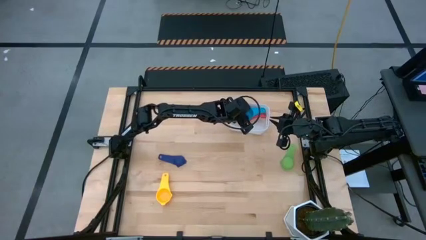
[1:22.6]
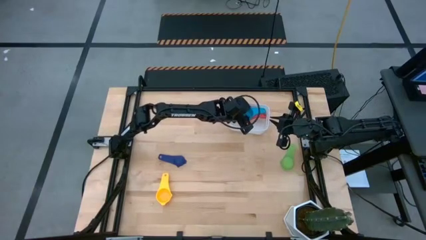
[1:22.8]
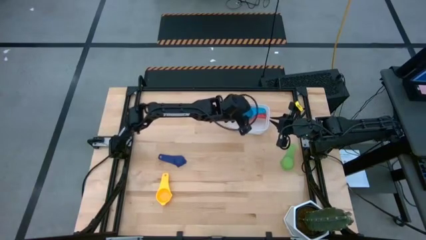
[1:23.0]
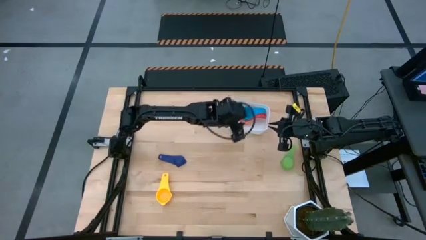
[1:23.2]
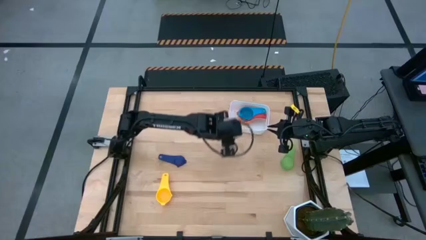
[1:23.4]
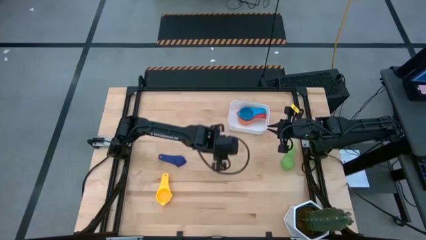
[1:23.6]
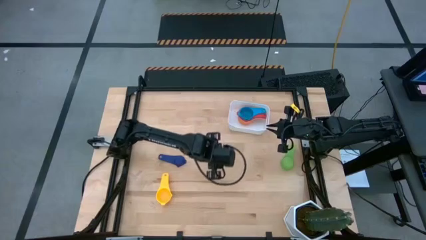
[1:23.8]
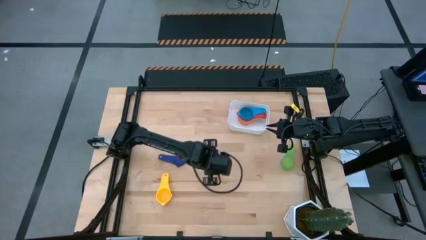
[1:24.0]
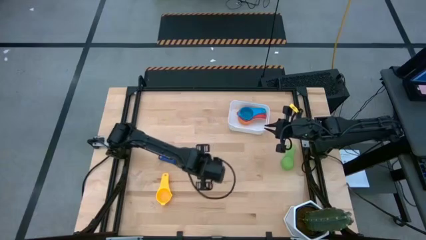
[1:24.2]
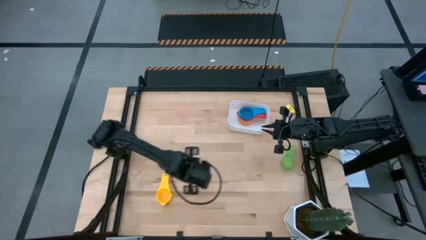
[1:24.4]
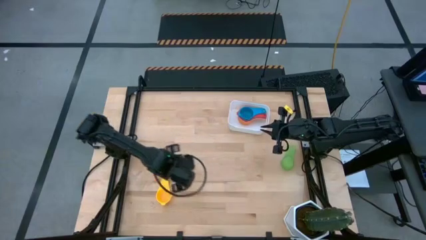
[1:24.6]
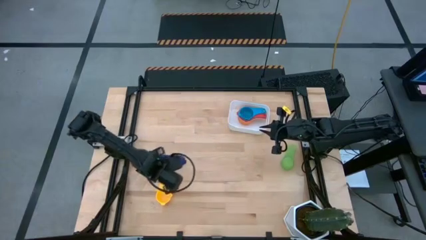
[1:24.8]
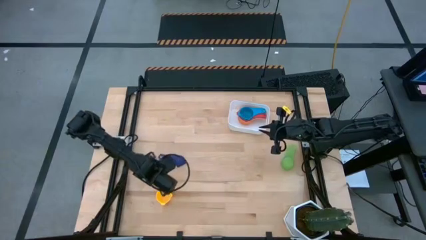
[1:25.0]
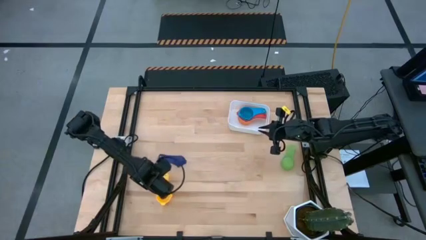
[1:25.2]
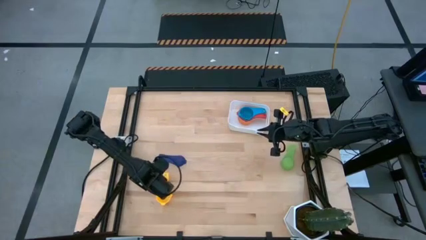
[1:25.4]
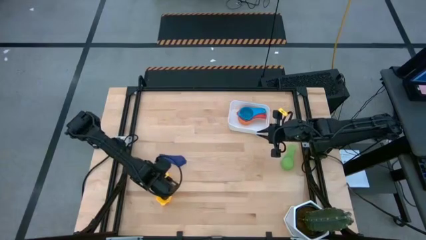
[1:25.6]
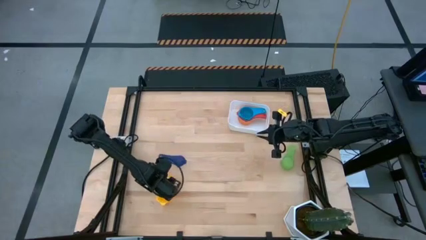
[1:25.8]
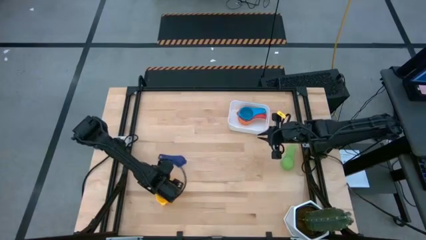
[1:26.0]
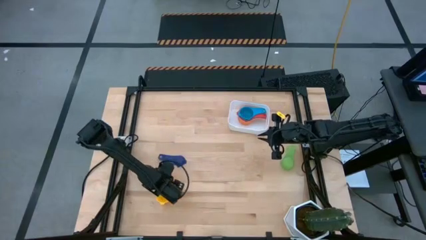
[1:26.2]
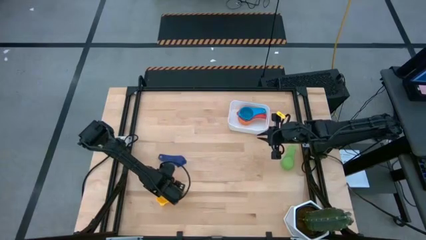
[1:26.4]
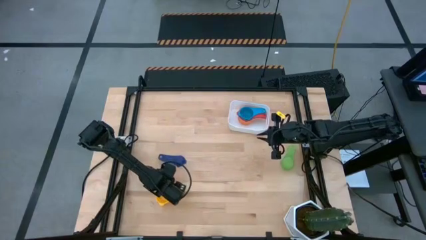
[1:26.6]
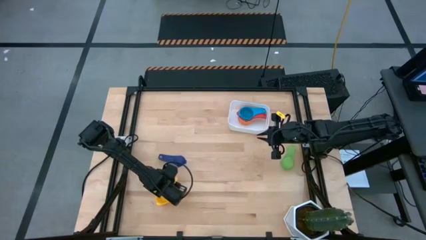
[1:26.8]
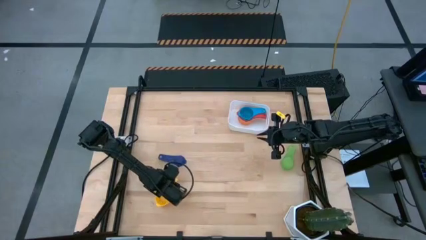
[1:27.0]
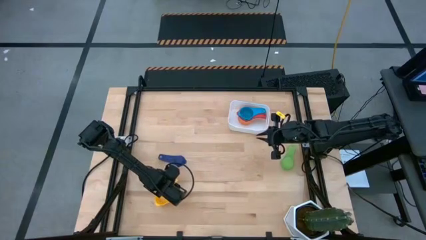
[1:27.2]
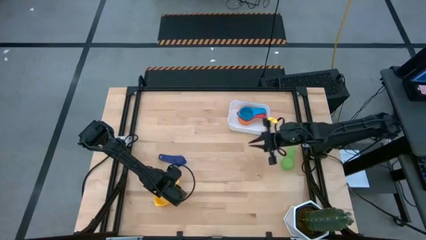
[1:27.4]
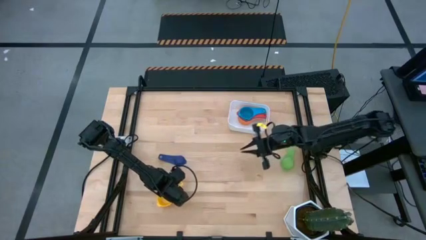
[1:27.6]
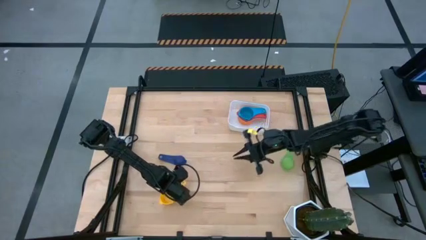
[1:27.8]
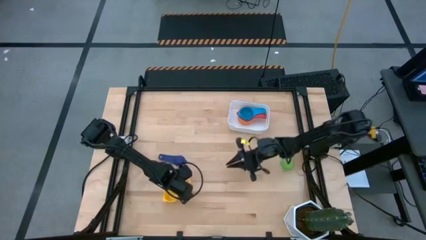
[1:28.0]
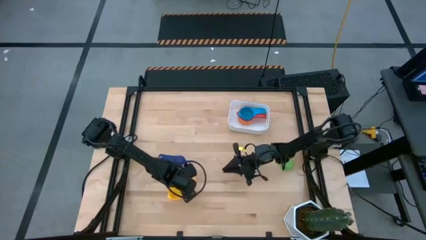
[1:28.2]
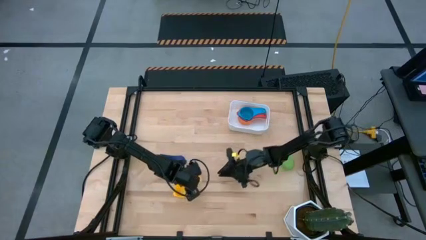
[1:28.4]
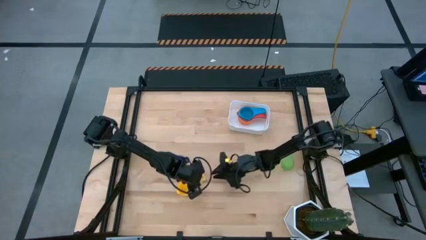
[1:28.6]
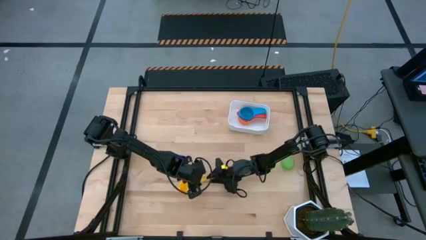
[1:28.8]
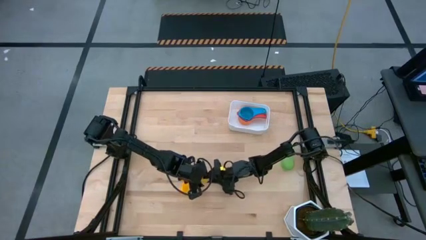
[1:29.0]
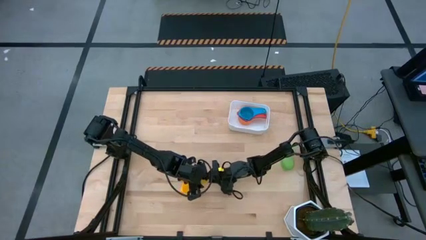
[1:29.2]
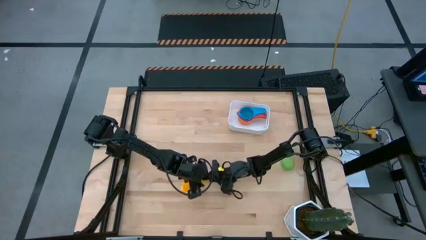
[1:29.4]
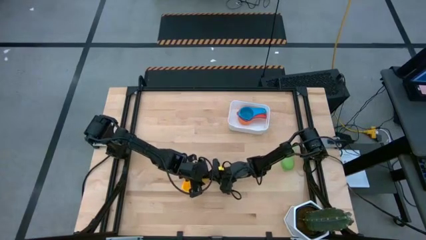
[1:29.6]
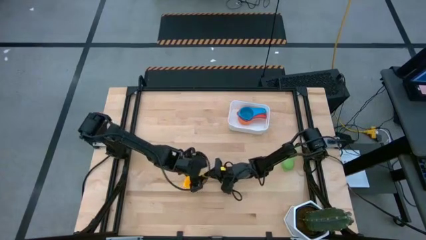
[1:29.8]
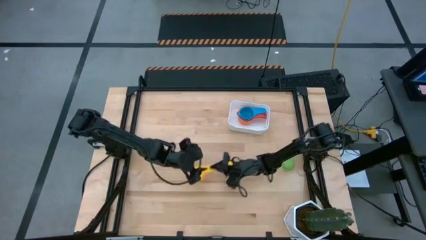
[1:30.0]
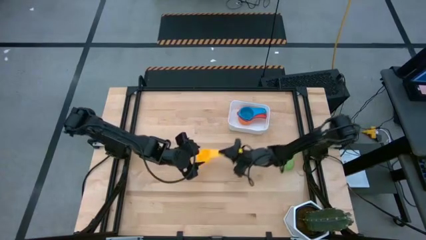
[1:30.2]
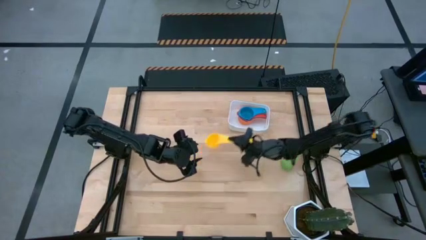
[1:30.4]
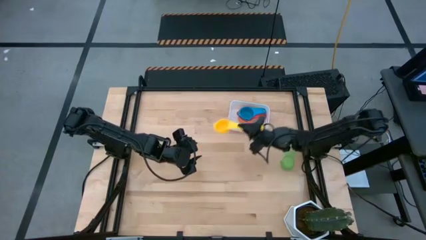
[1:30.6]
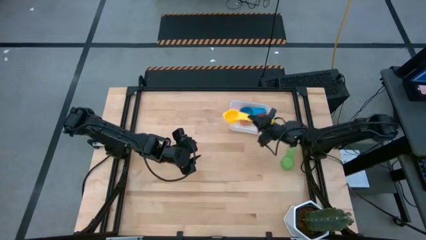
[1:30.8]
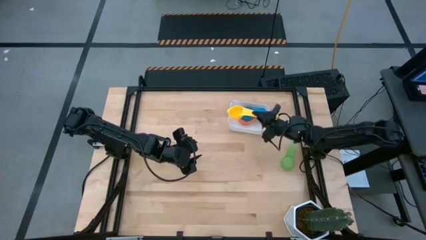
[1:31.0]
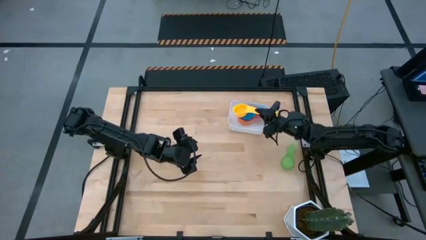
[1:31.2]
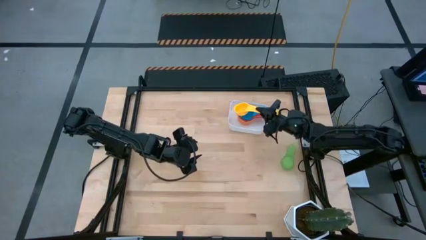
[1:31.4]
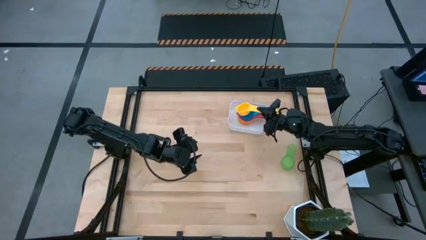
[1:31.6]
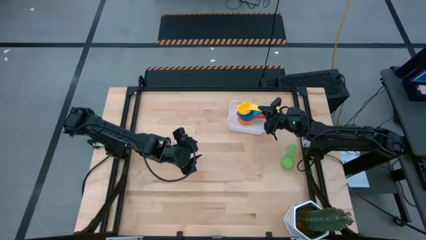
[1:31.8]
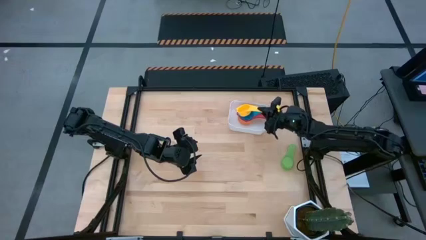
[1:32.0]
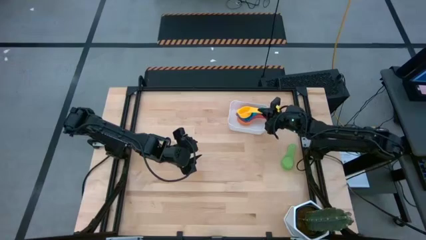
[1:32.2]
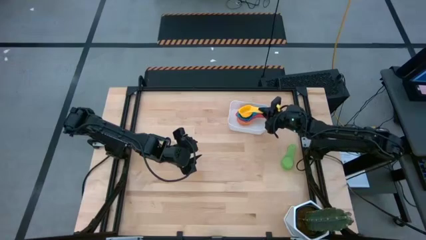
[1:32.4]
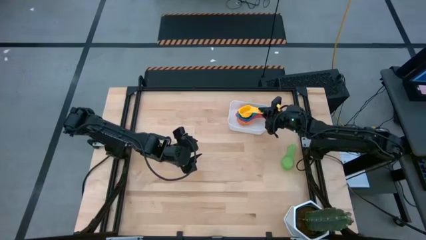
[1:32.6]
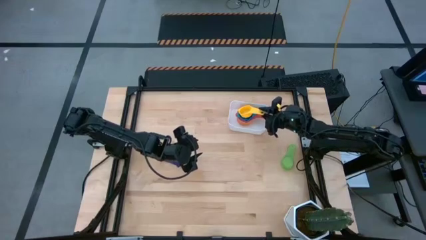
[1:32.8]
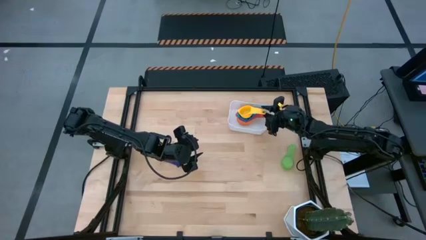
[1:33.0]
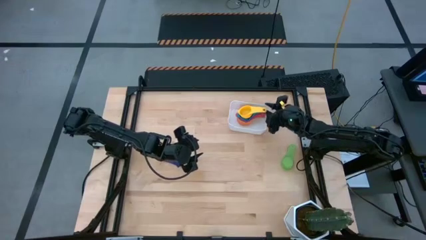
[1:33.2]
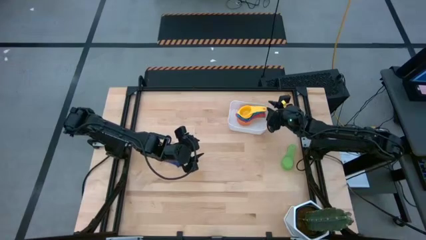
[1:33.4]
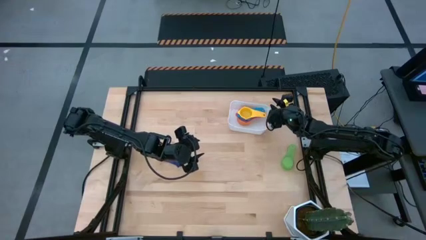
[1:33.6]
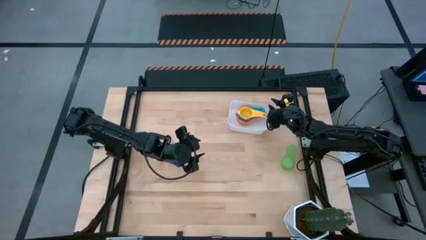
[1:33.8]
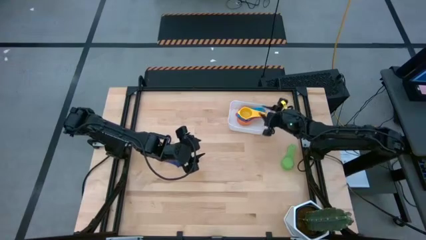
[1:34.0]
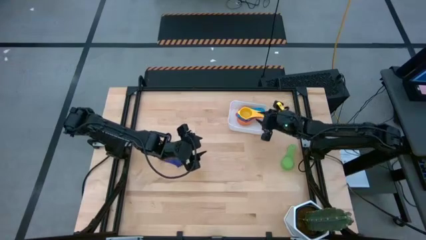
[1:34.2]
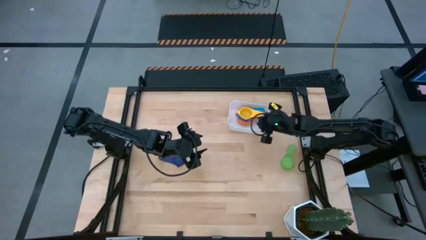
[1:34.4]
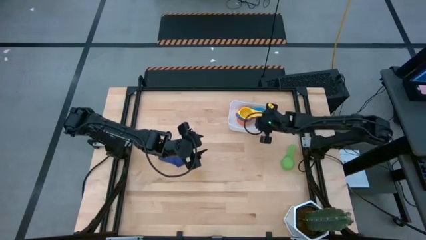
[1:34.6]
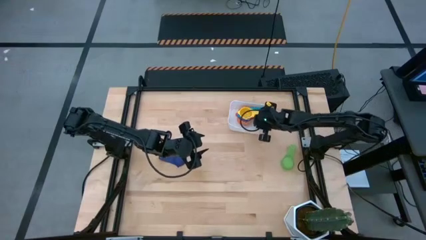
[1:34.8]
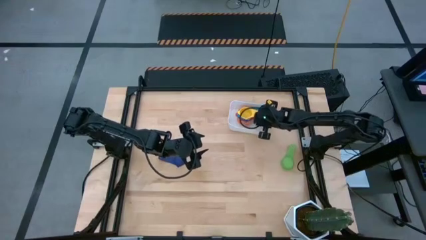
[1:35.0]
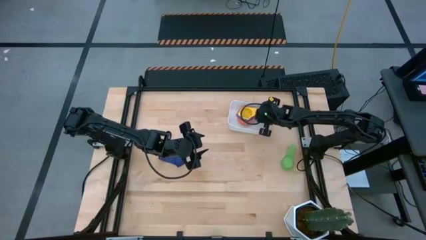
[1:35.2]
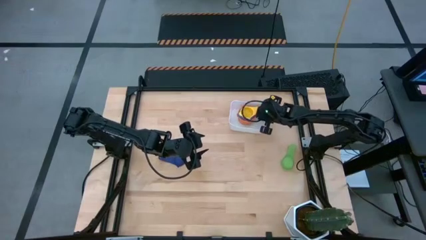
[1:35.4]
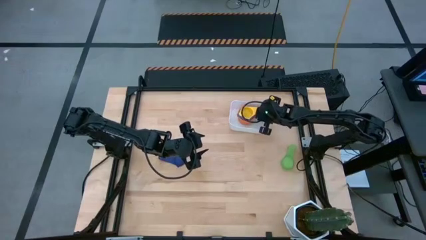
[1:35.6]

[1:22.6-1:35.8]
Task: Nest measuring cups in basket
Stack the yellow measuring cup on top of the light blue measuring cup in the white bin
